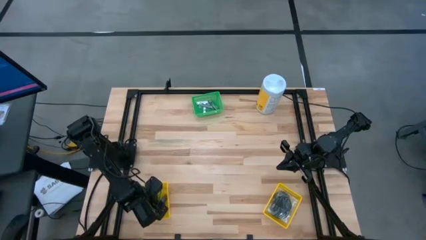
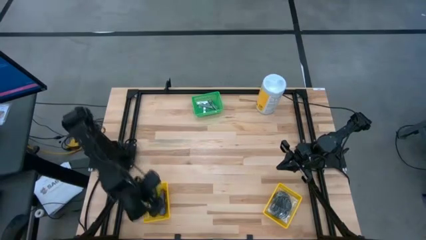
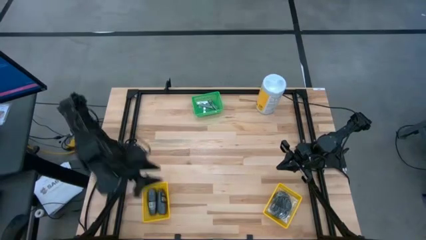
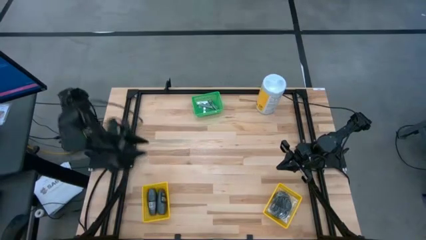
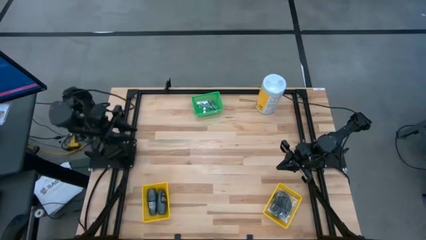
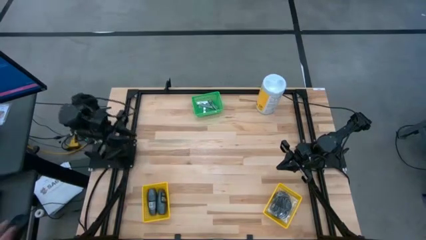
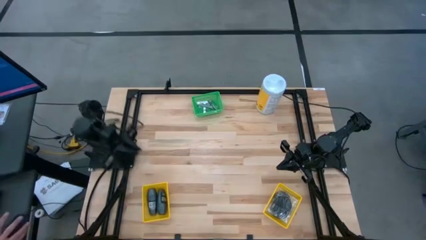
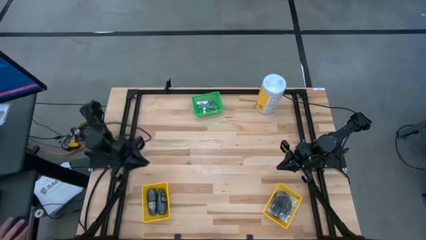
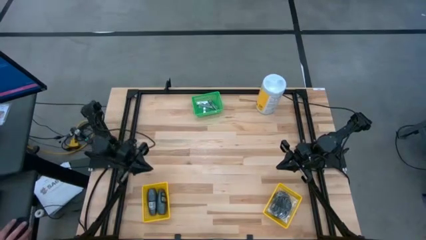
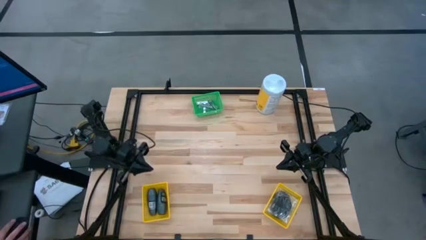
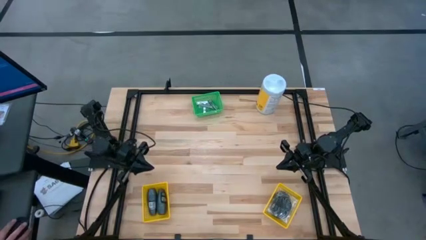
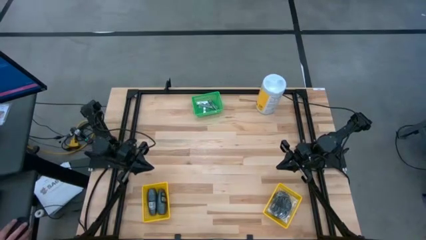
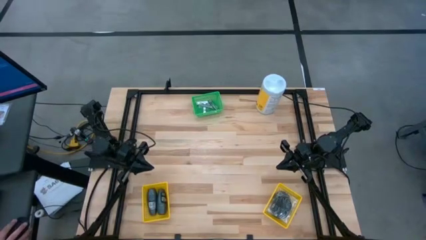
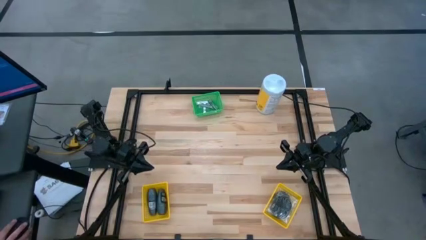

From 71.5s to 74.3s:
Task: Pick & Place Travel size toiletries
Return to Home Position

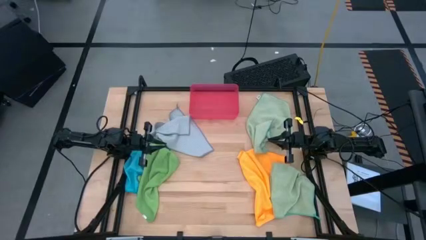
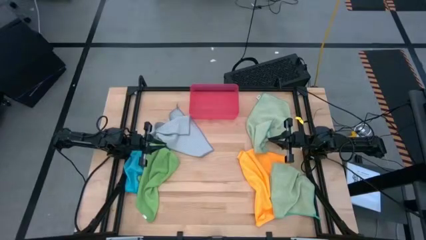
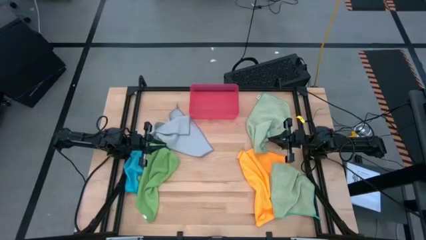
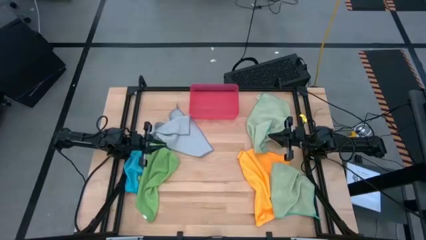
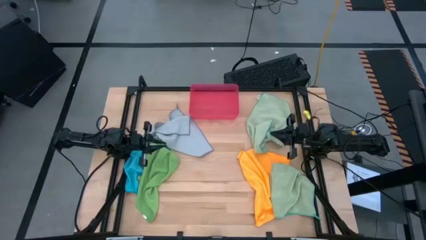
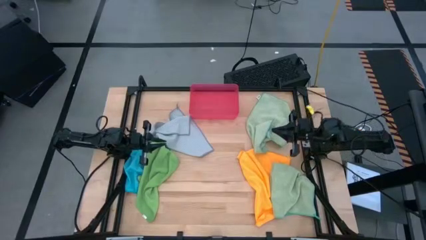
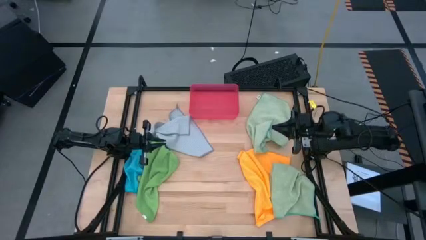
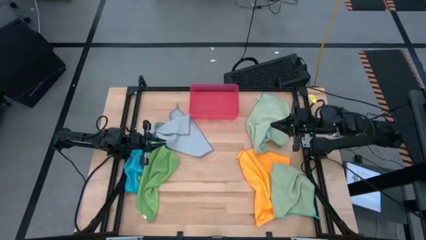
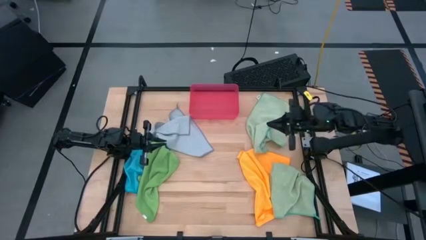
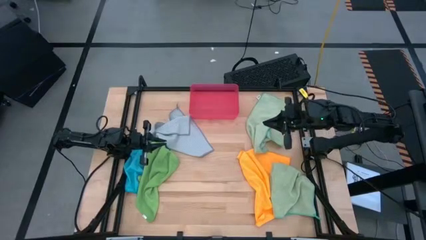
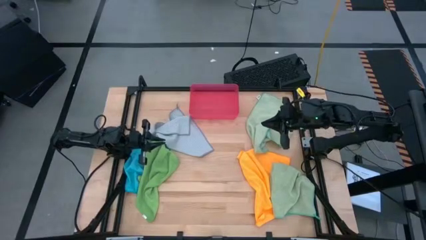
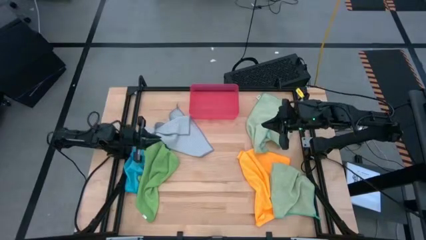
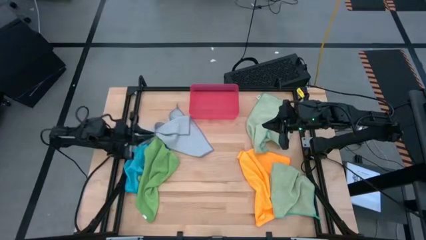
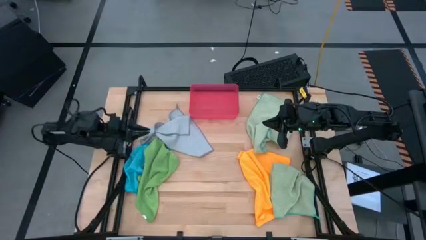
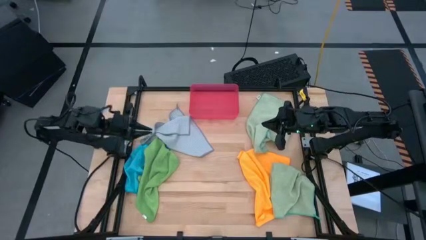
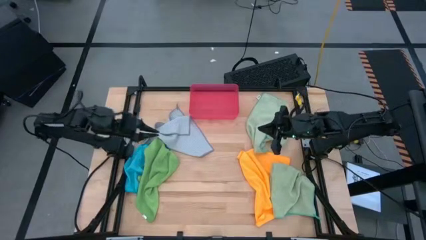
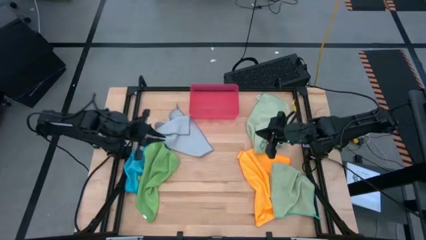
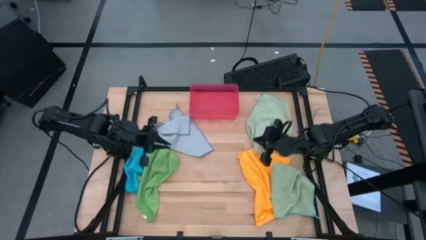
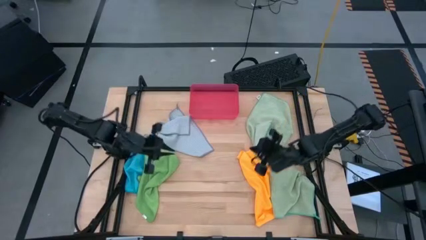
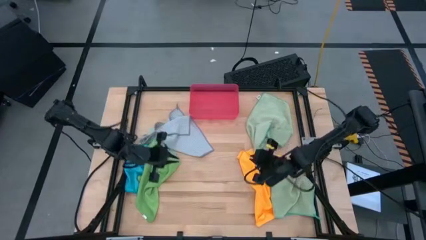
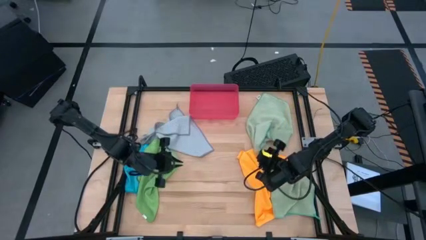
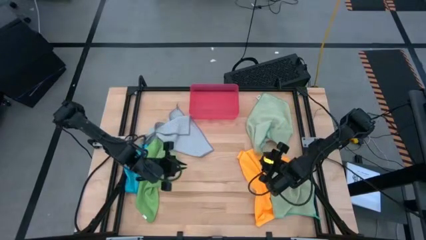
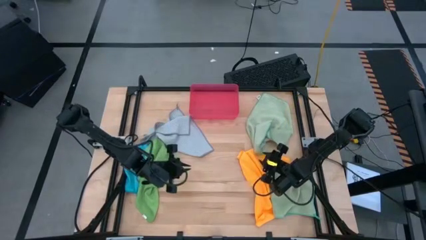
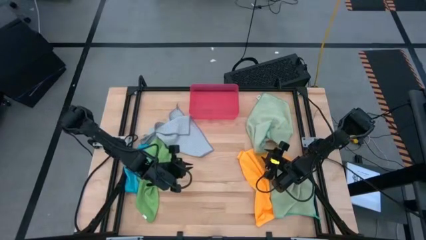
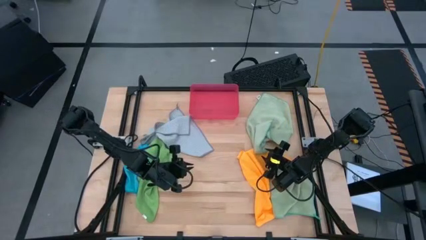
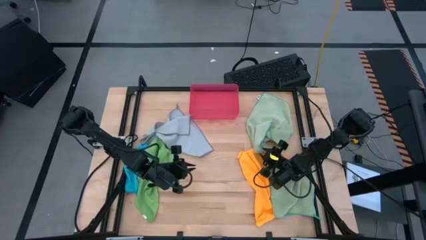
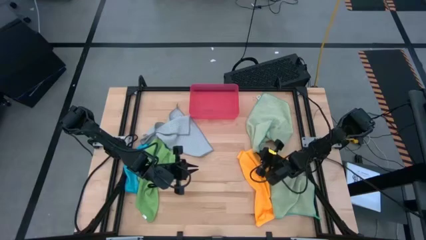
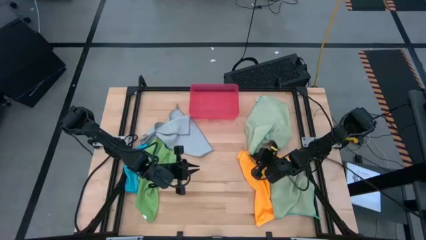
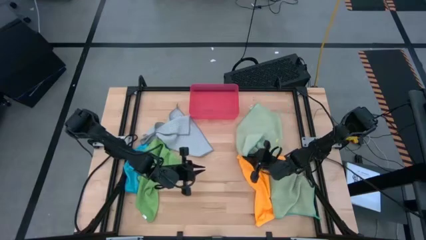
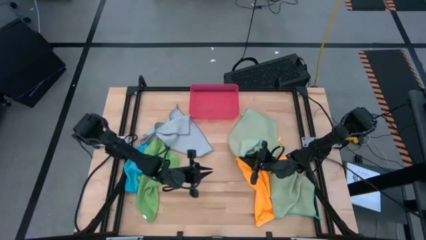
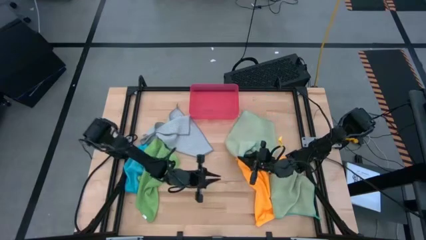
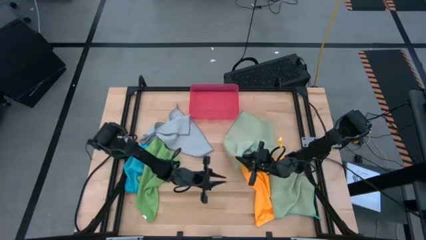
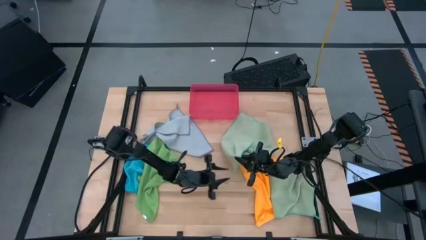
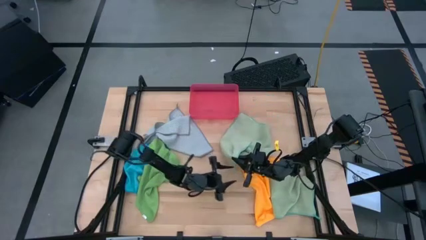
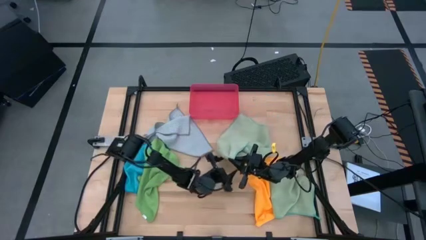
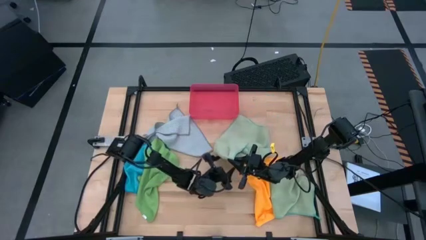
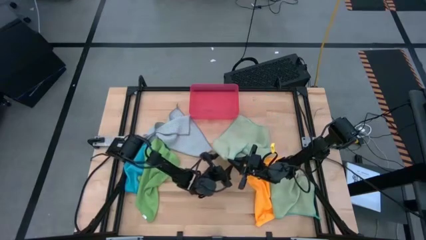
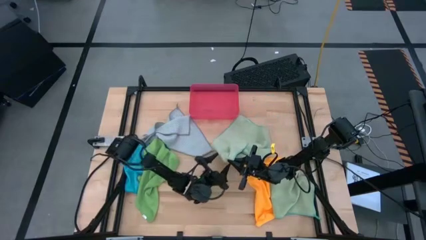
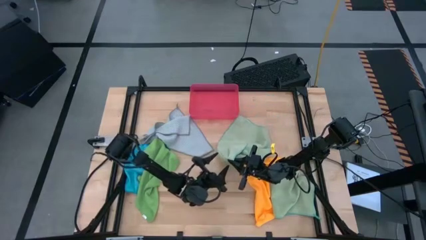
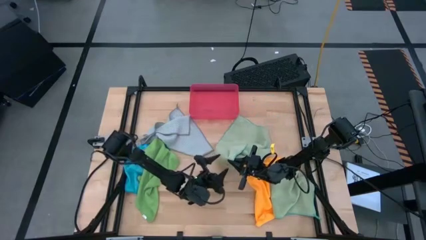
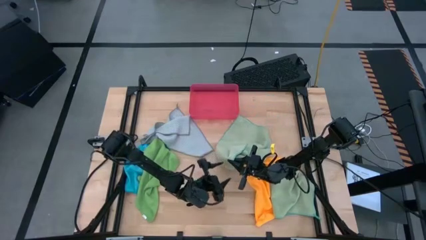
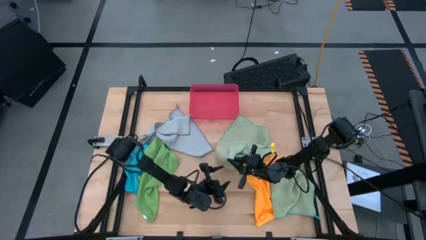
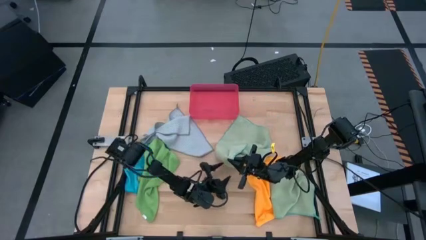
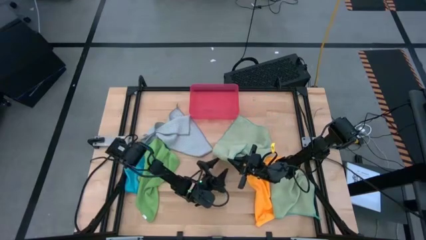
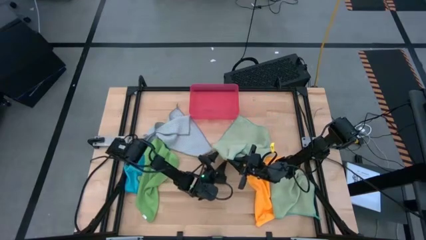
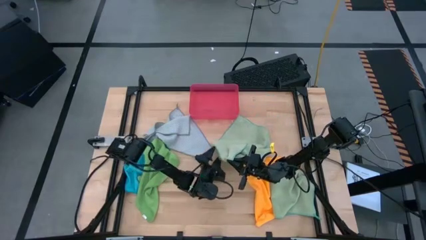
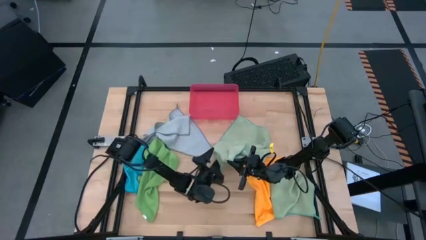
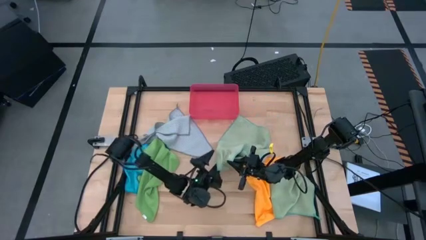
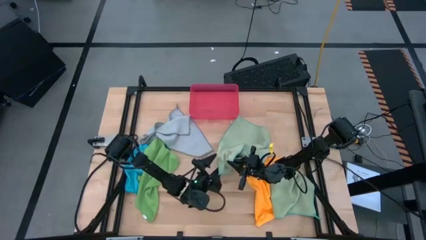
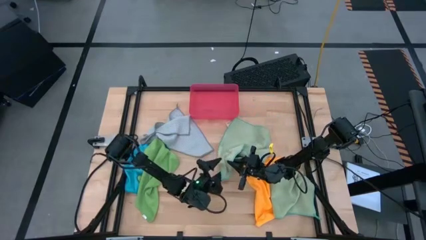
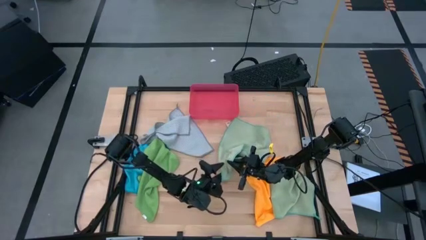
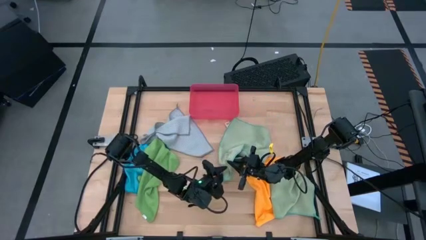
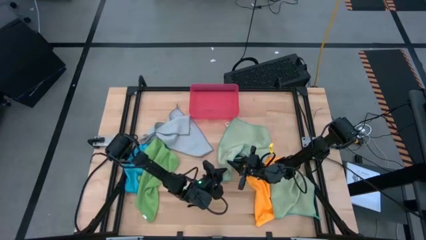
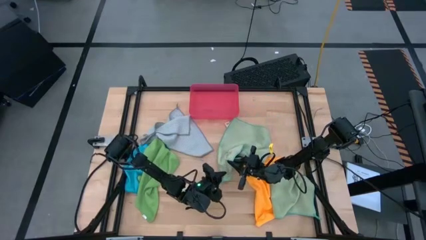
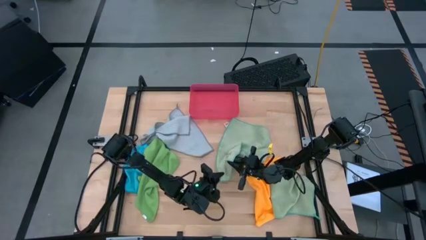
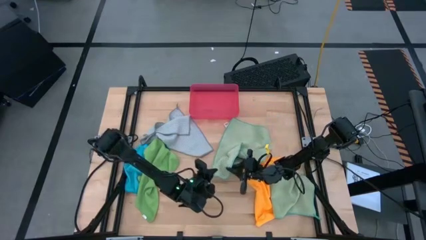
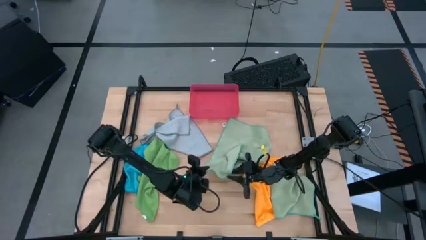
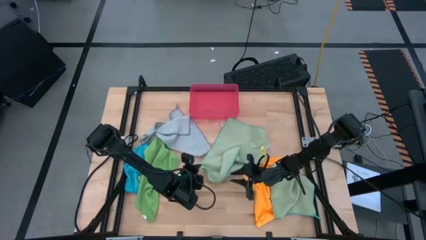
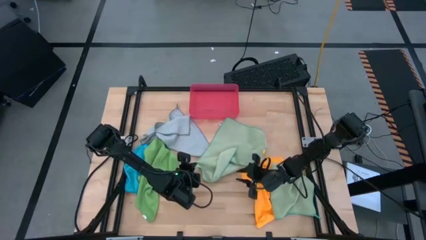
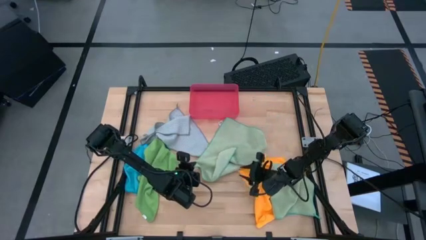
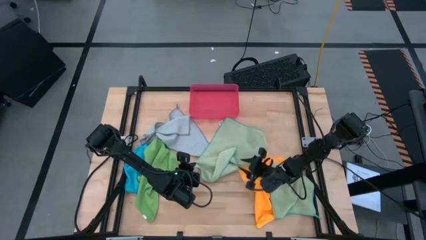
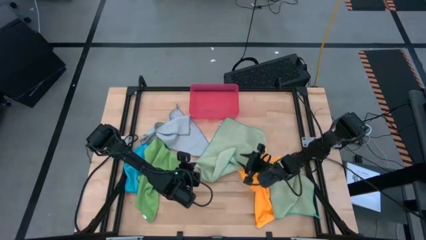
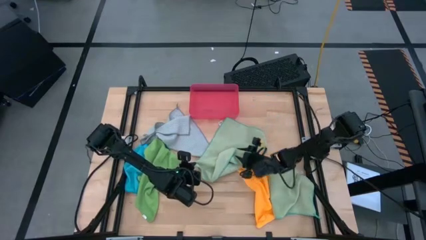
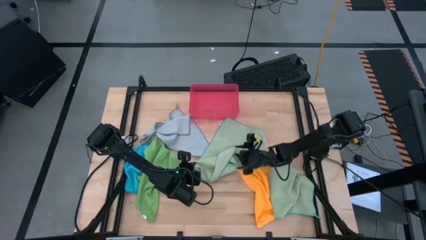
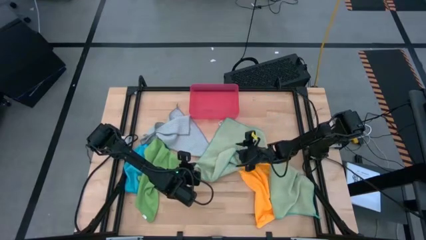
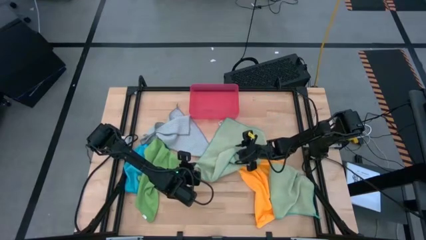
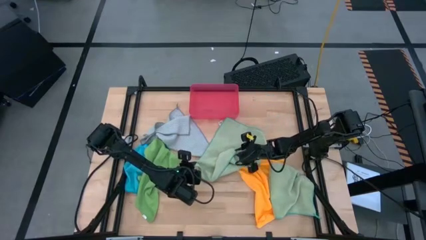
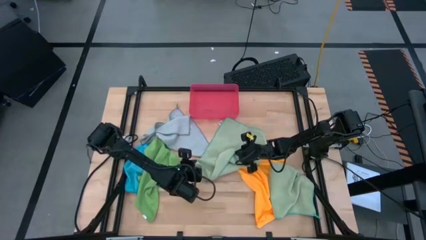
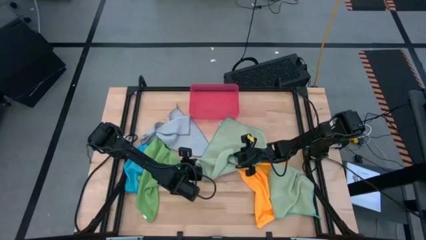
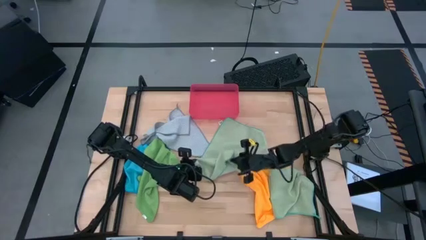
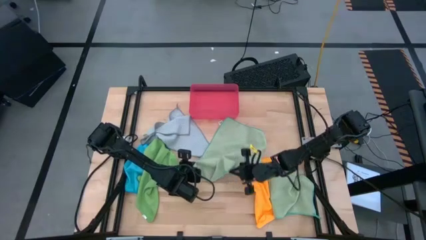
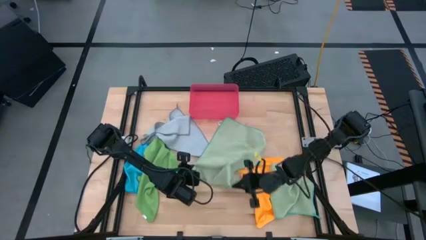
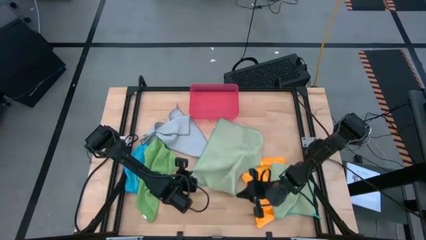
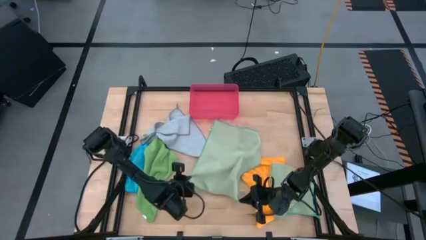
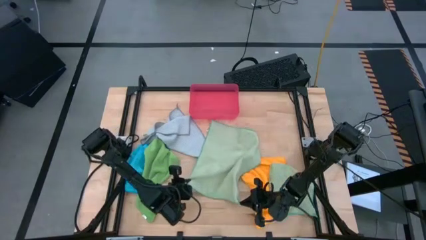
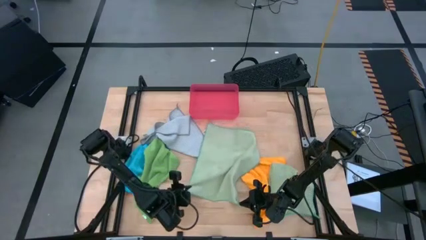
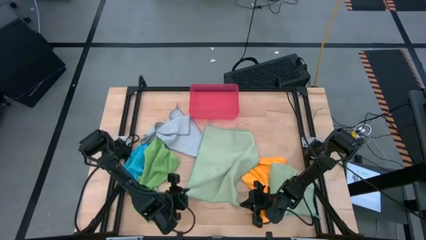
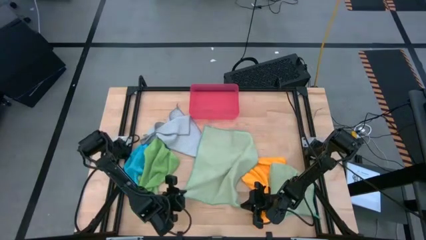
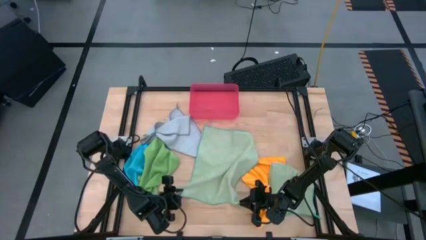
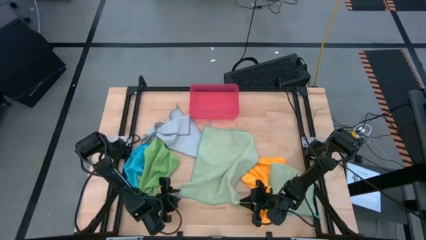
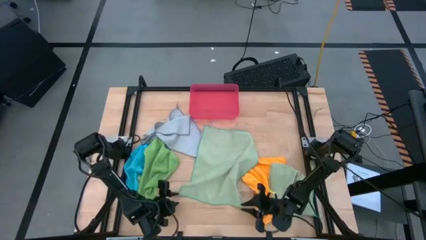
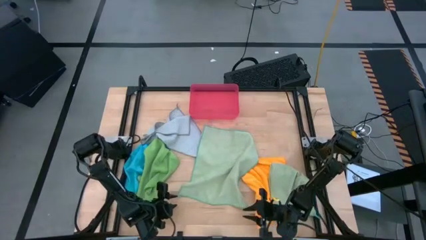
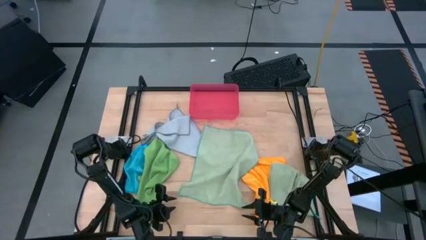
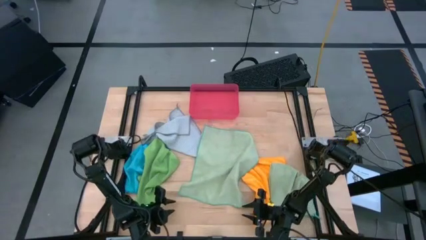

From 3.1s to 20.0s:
Task: Fold microfiber towels
Fold the top light green towel
